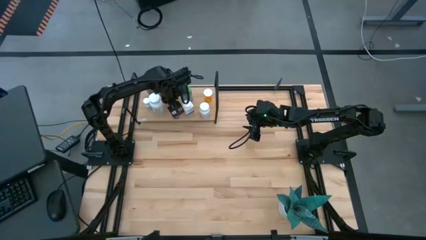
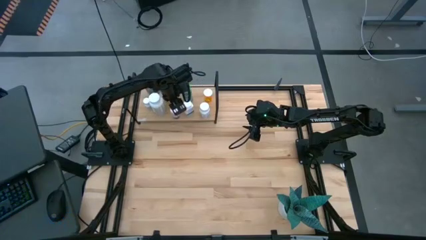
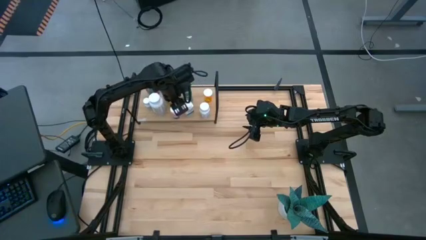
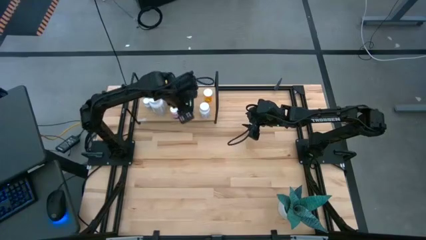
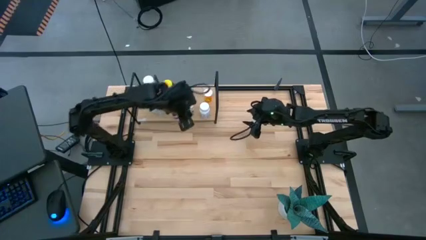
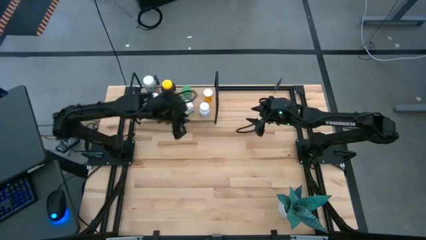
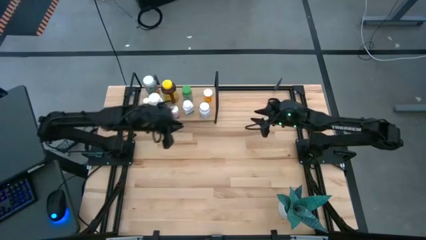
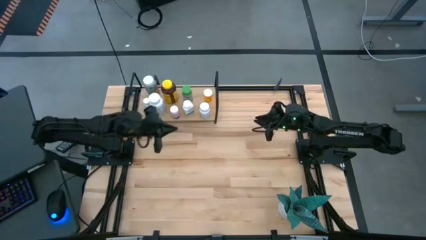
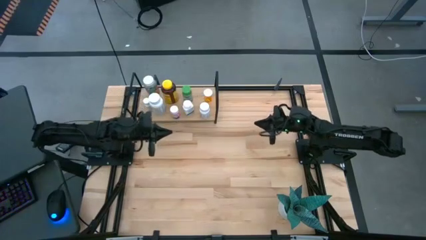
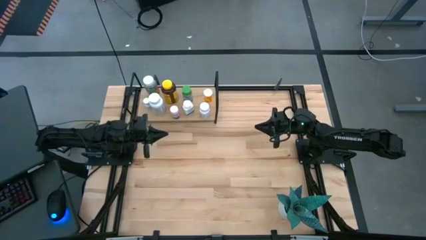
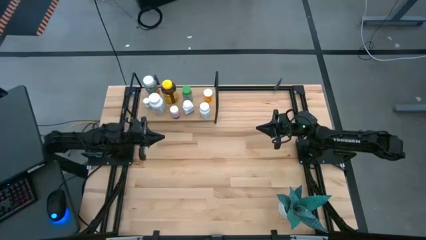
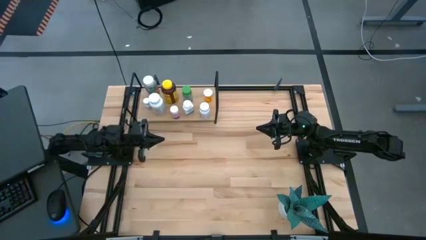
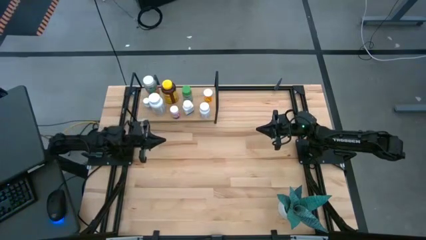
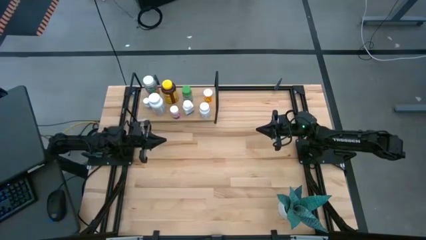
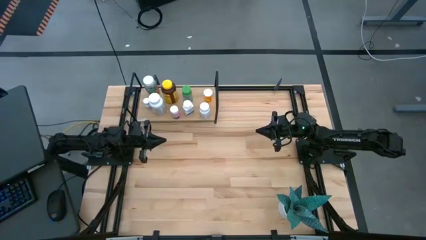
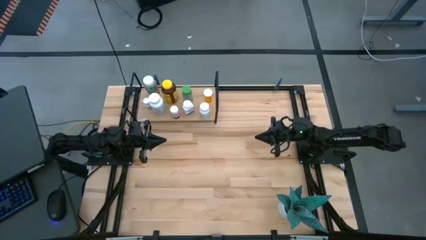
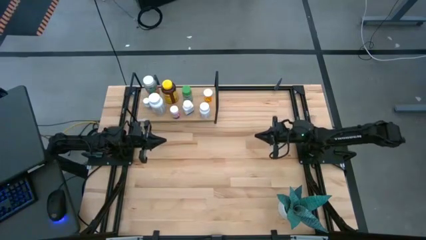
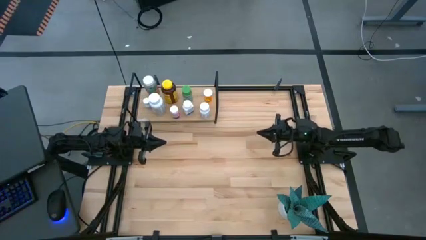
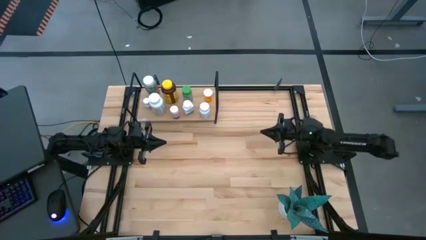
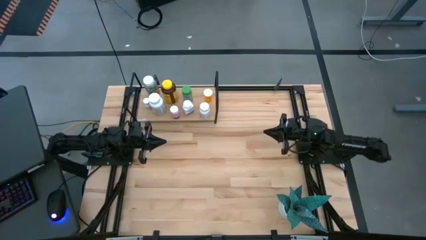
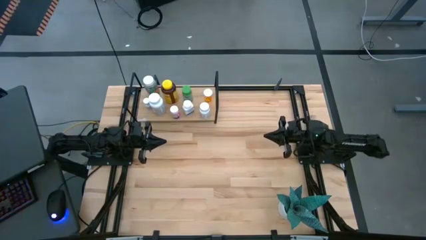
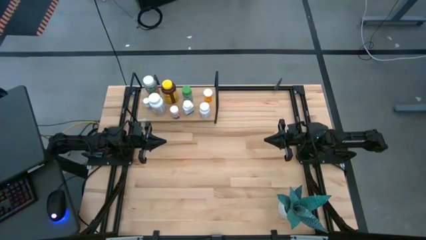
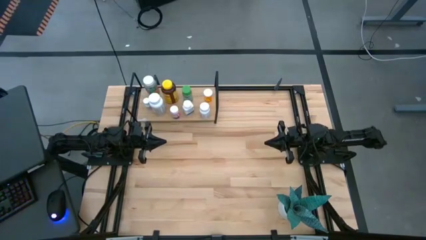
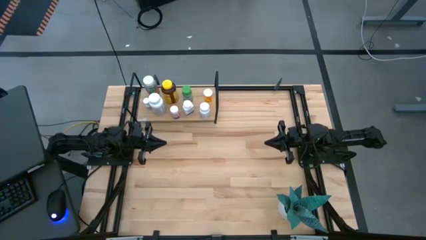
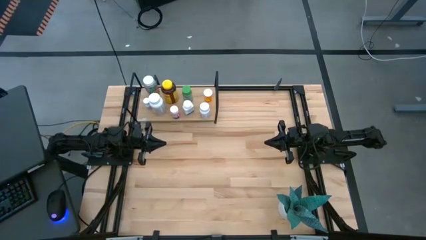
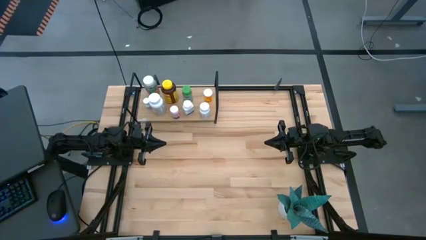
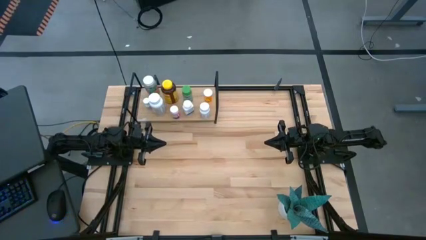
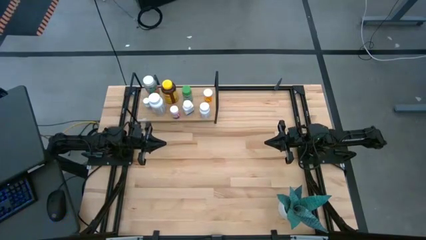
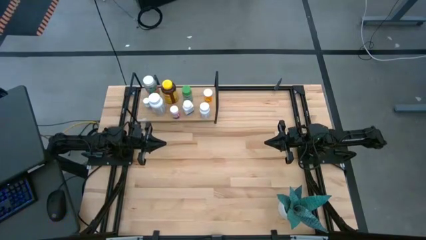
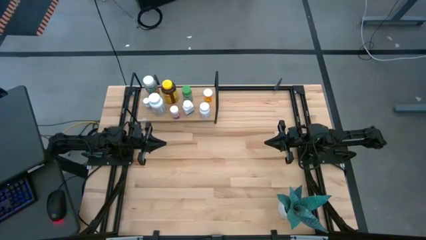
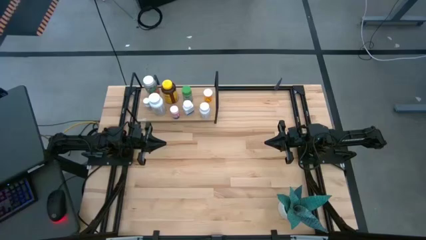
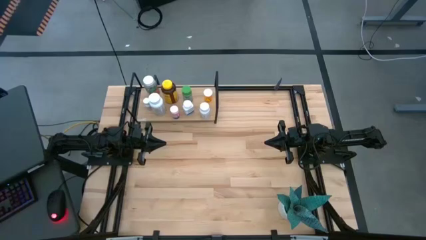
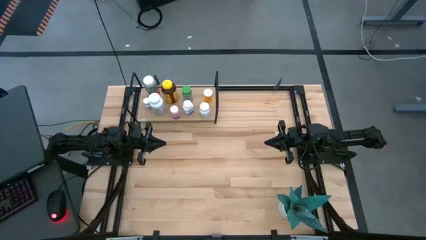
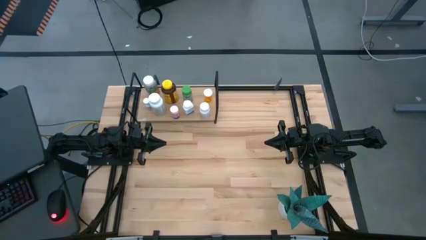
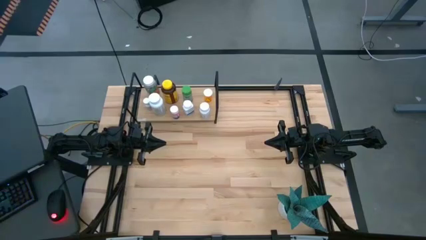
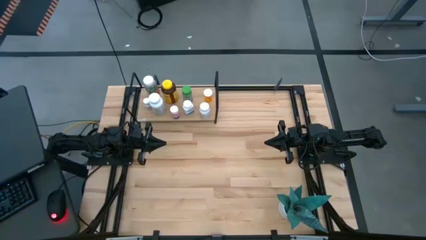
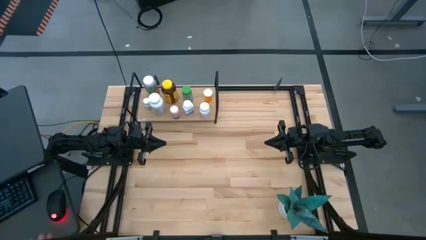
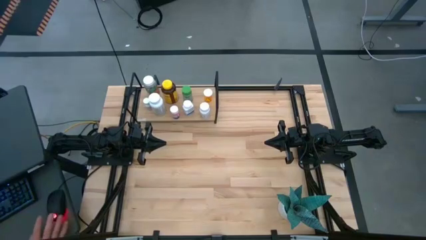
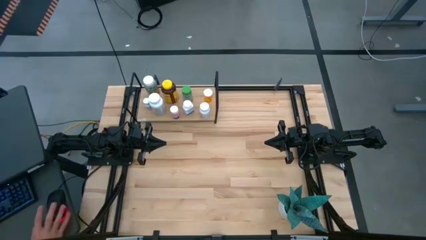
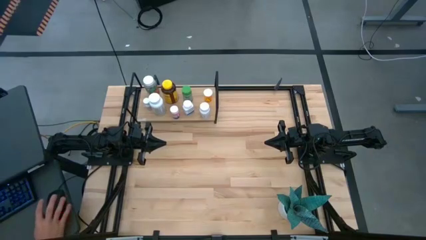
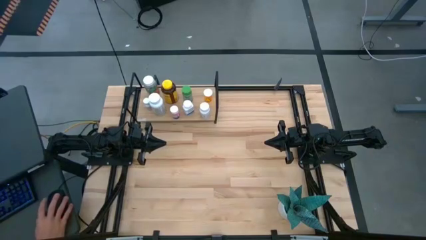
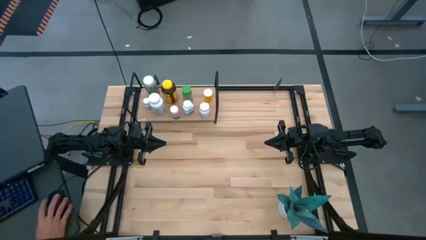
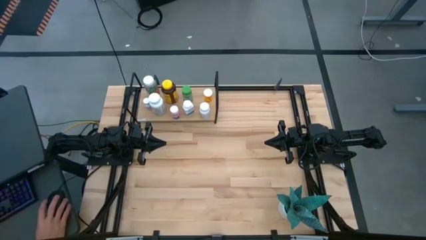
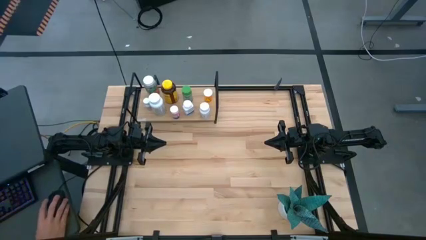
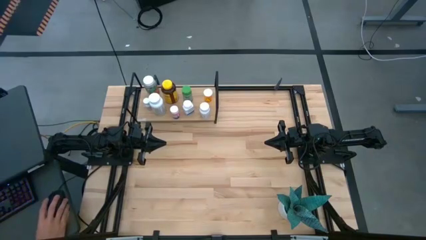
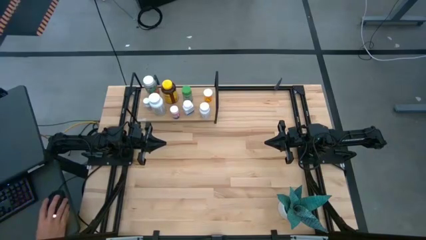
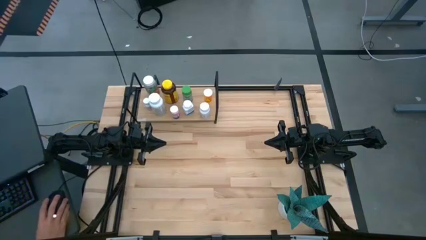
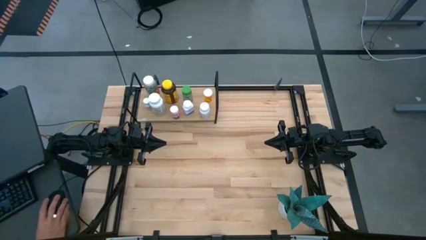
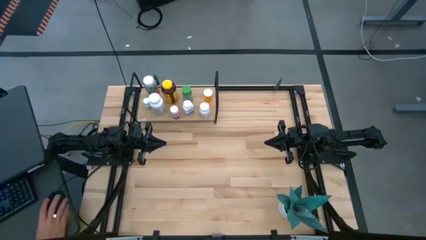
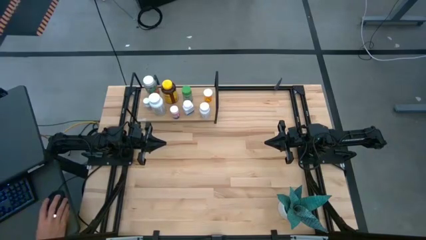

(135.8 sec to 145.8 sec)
Task: Pick and place medicine bottles onto shelf by color
Return to Home Position

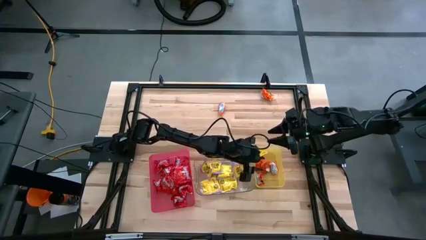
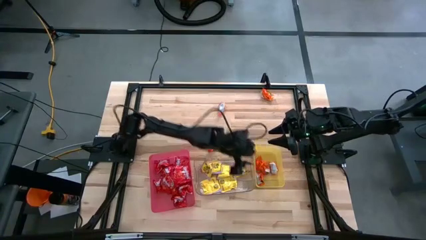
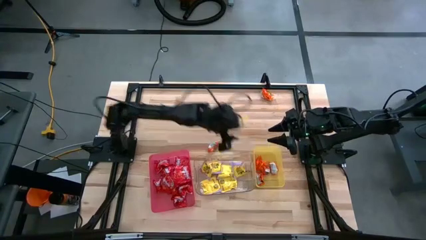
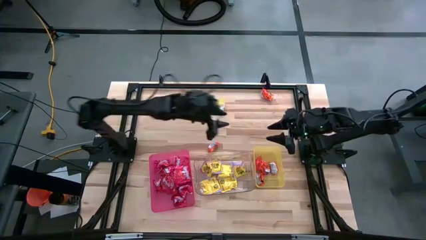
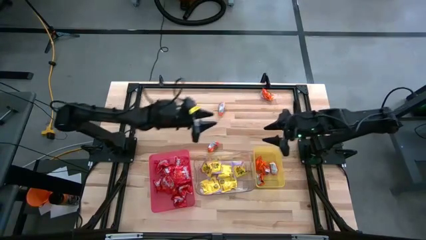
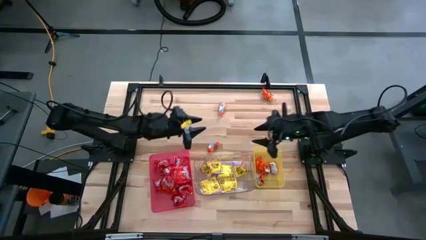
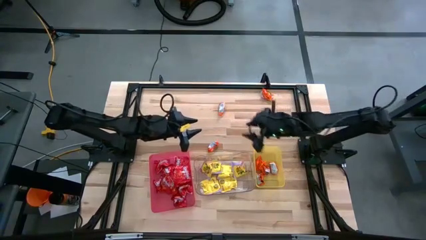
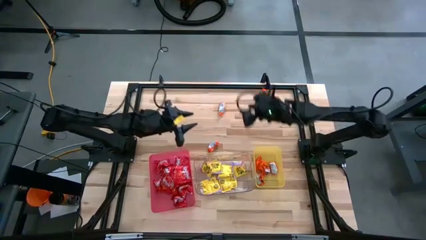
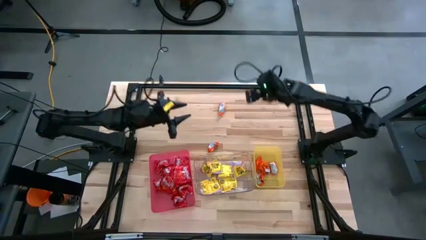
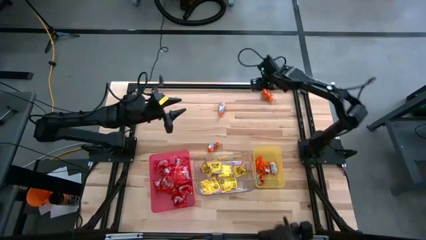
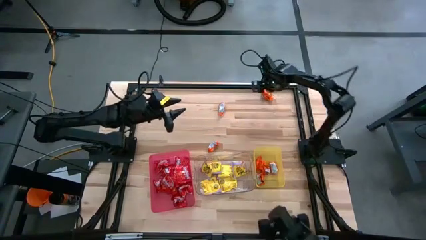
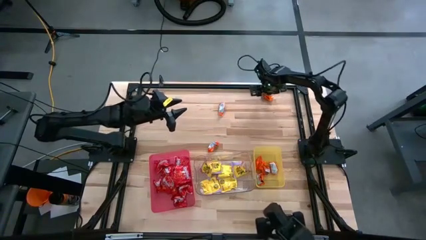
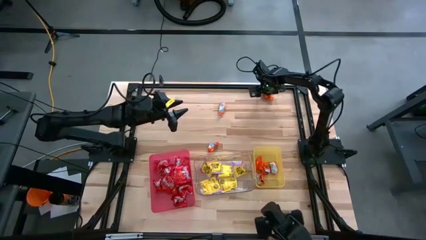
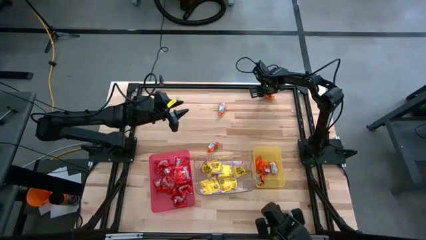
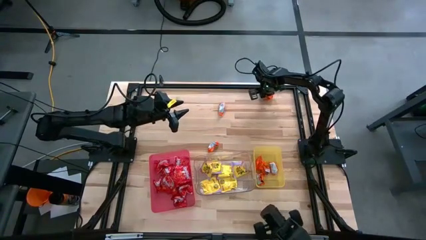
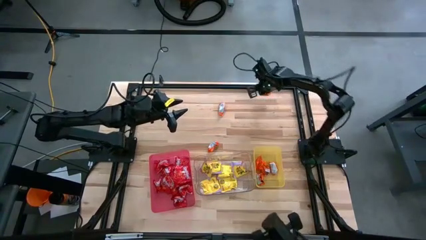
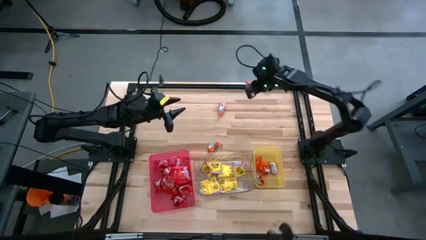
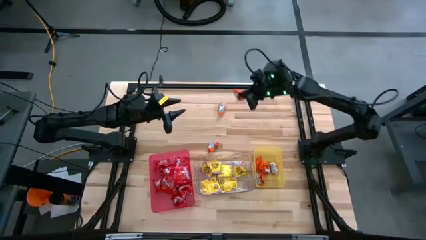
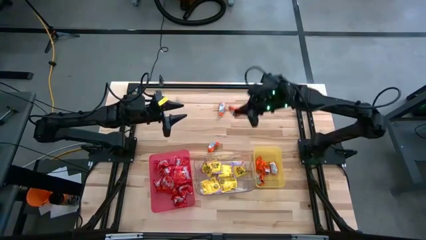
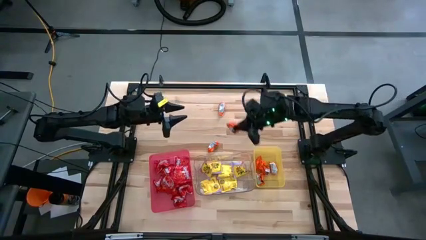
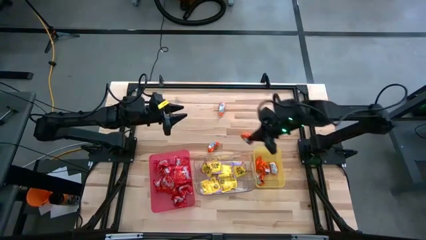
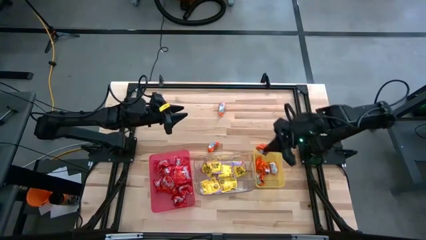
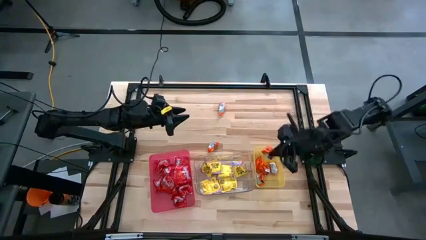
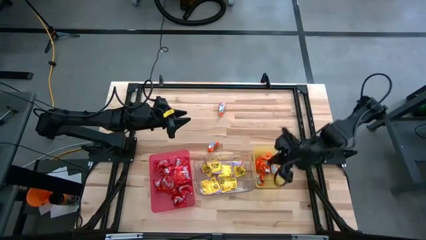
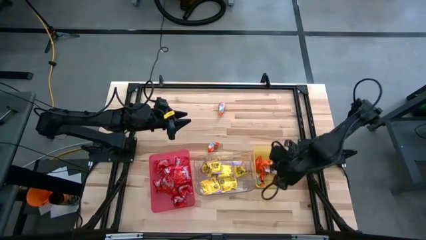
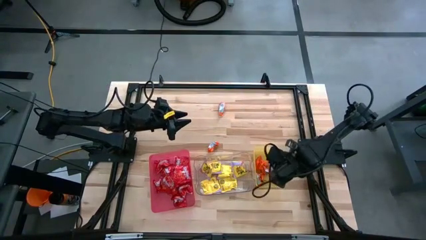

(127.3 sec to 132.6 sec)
Task: Sort candy
Put the orange chocolate into the yellow bin

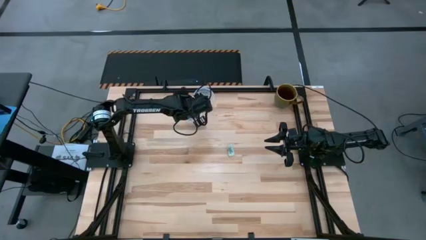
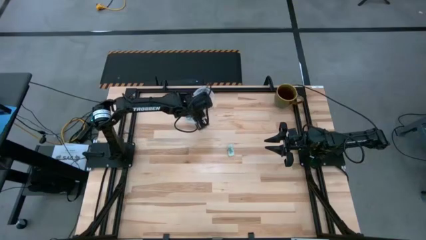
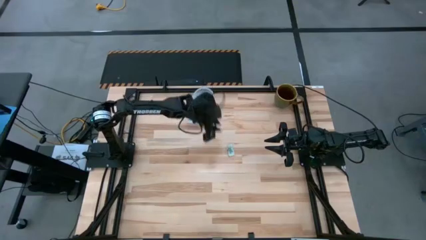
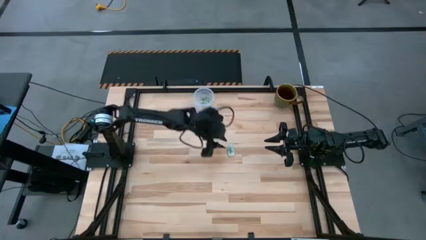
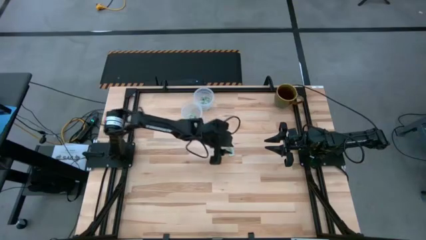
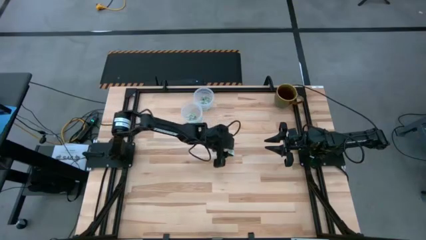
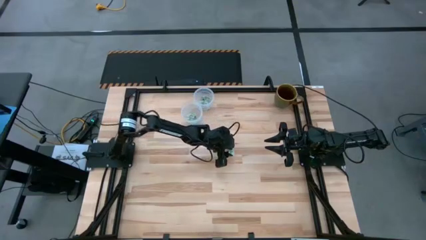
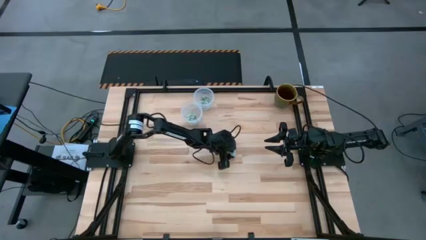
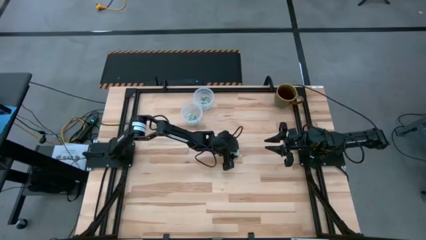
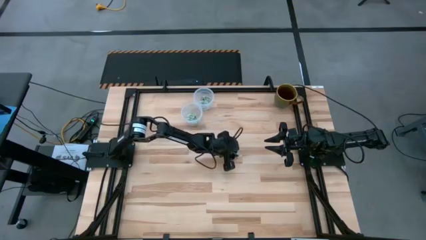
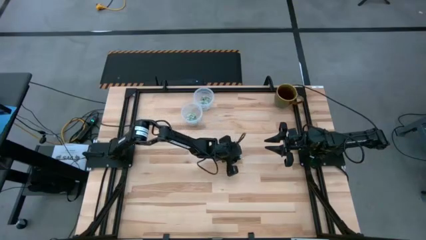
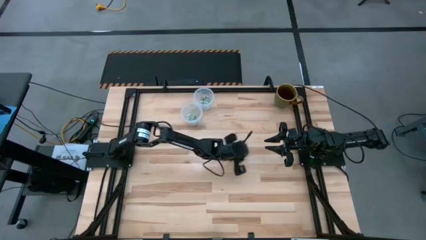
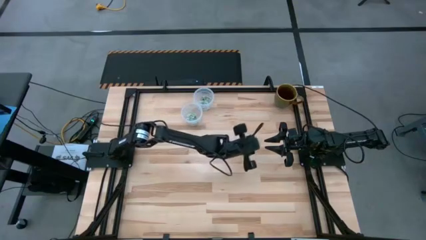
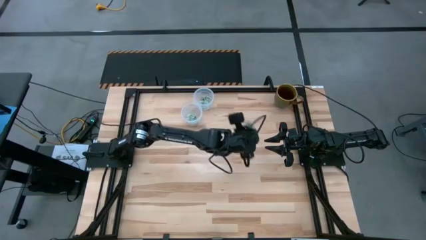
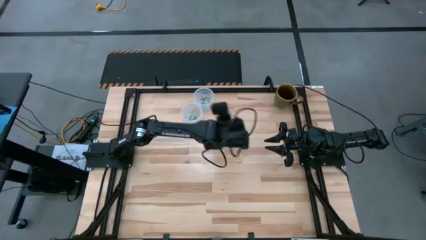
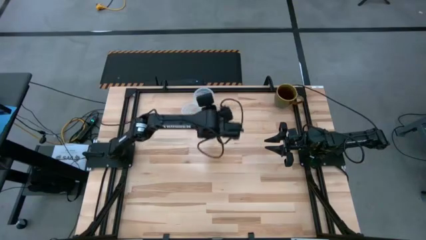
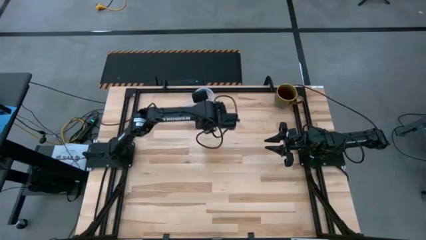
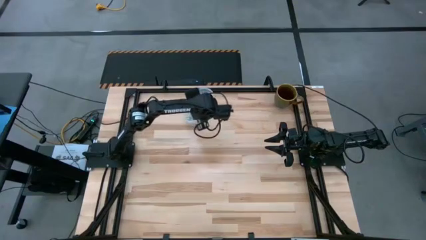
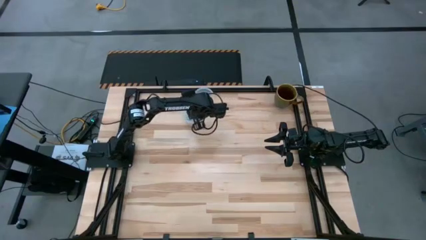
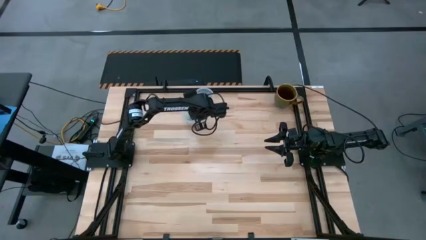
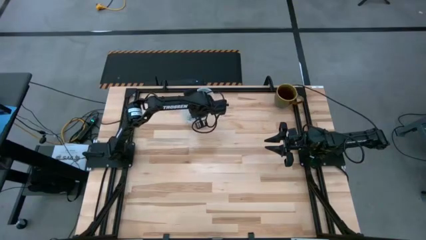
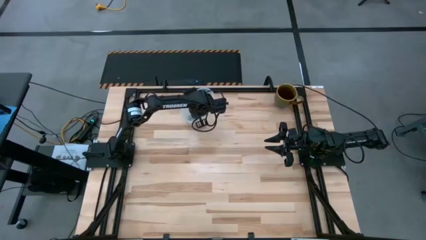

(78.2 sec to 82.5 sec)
Task: Pick and place items into bin
Put the stevia packet into the bottom bin
